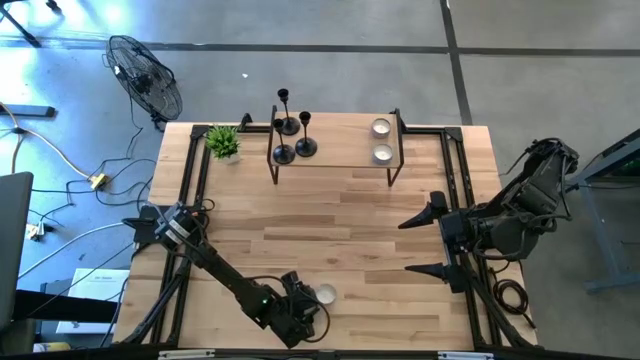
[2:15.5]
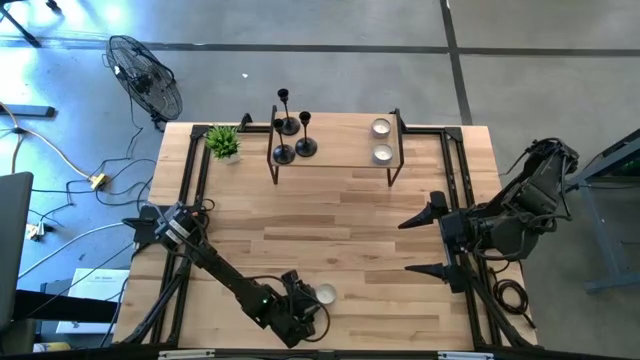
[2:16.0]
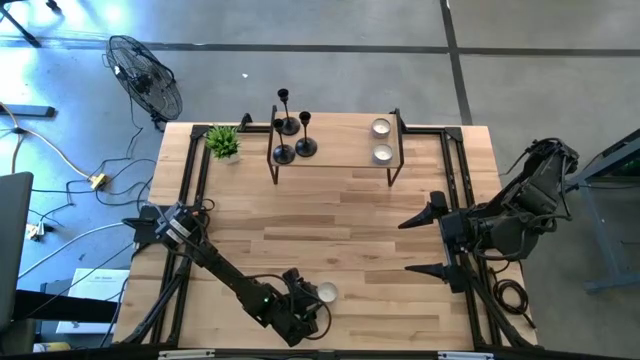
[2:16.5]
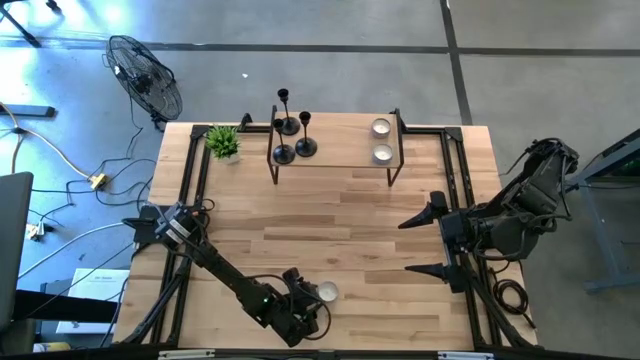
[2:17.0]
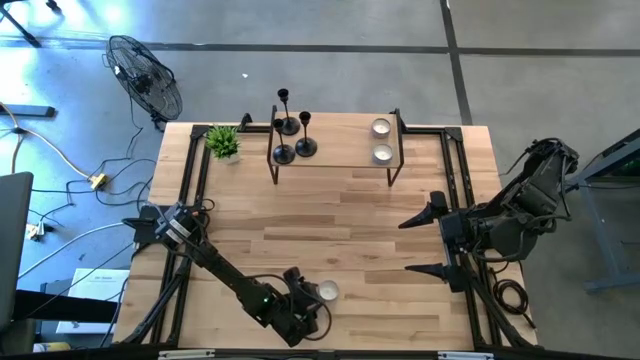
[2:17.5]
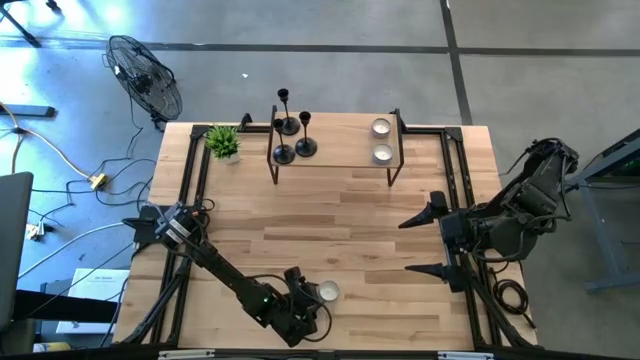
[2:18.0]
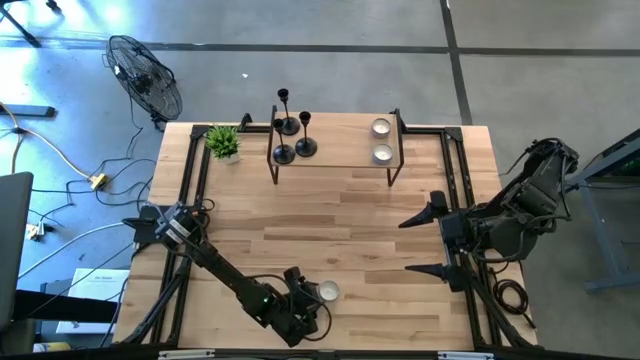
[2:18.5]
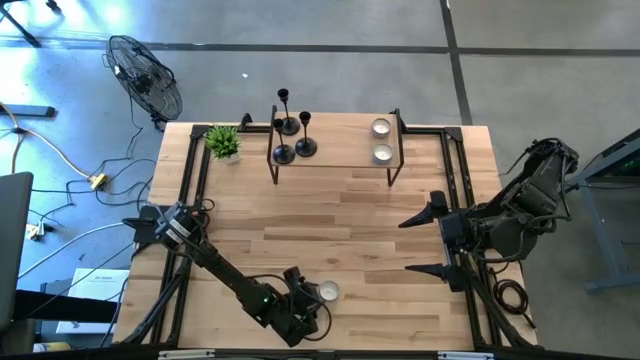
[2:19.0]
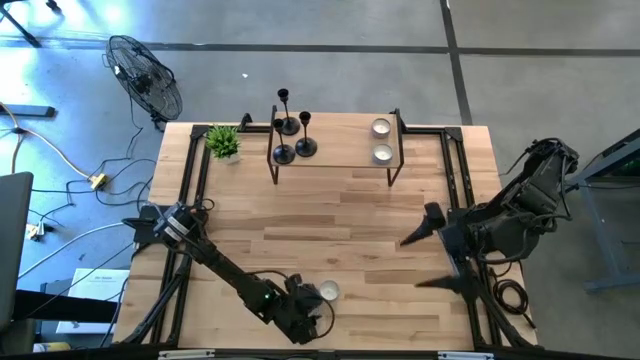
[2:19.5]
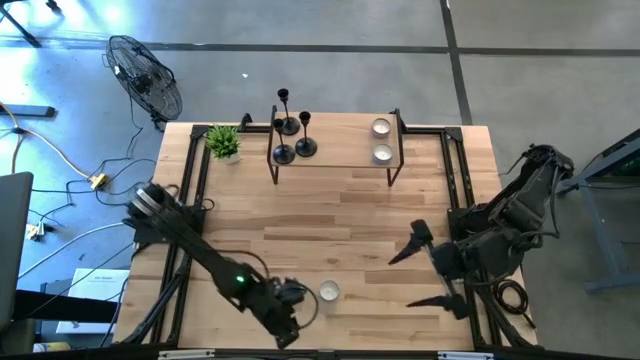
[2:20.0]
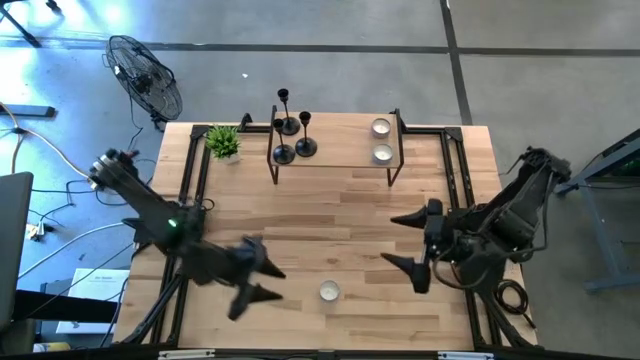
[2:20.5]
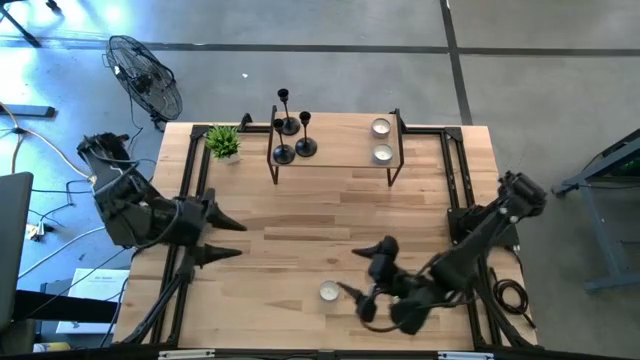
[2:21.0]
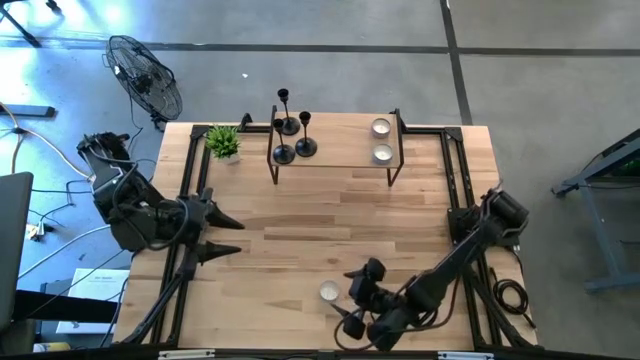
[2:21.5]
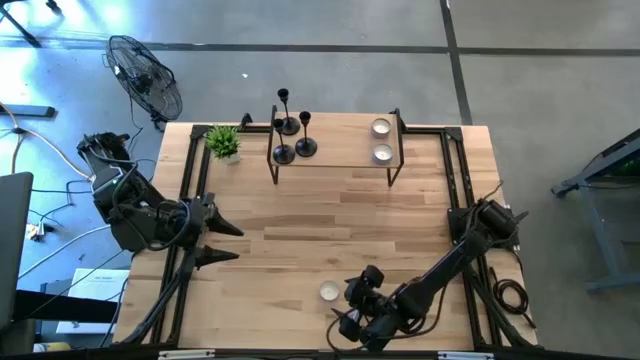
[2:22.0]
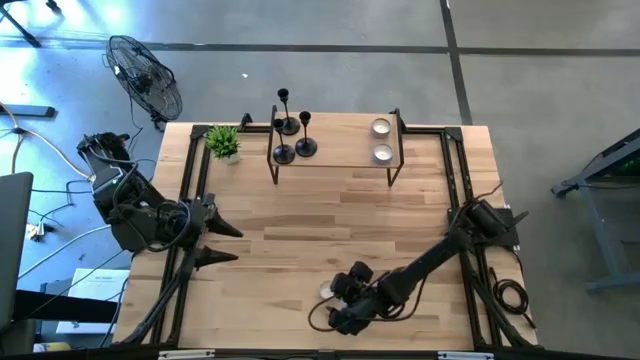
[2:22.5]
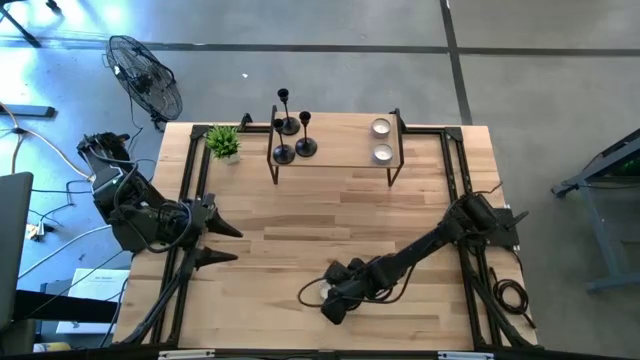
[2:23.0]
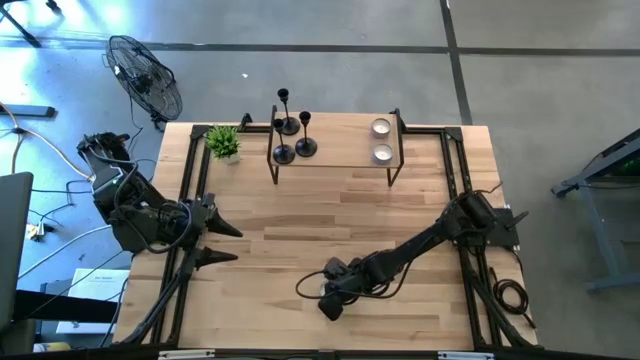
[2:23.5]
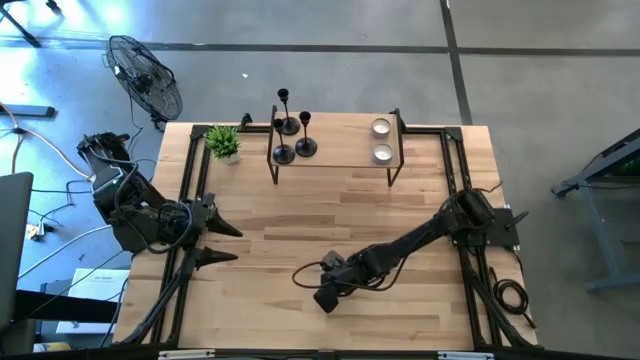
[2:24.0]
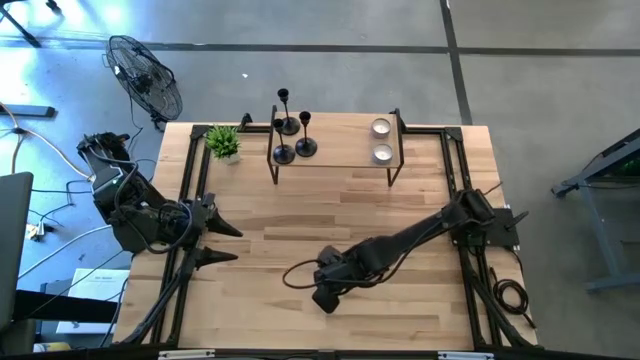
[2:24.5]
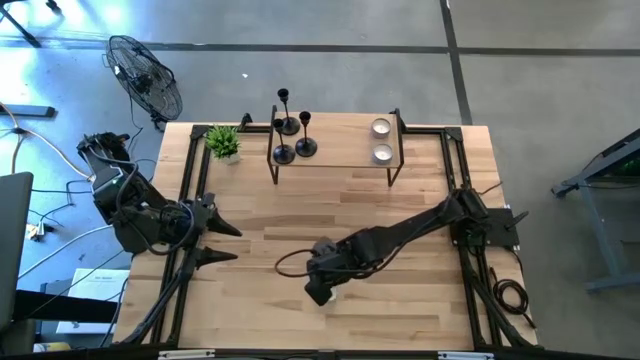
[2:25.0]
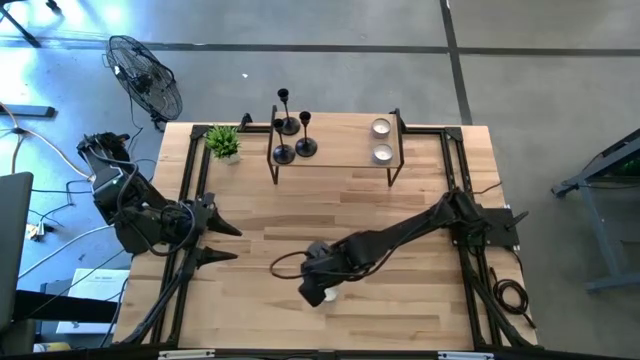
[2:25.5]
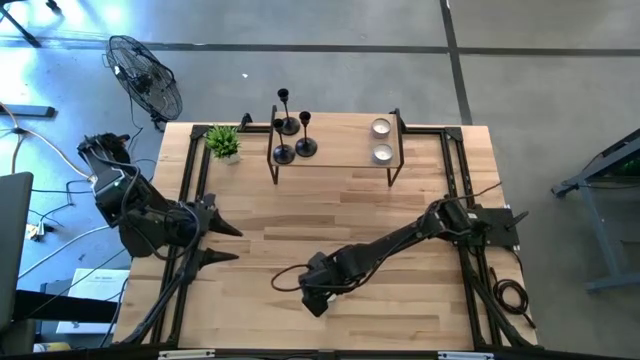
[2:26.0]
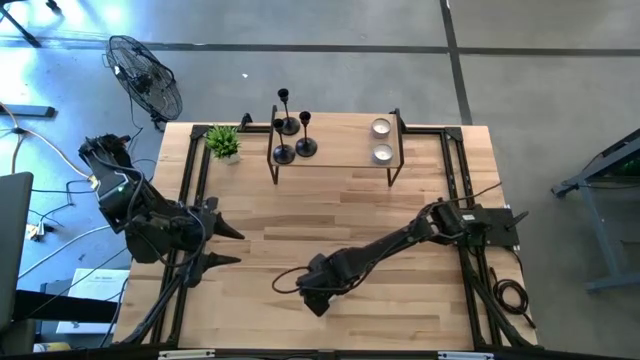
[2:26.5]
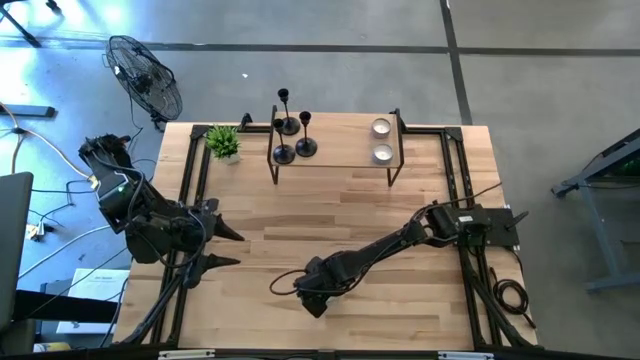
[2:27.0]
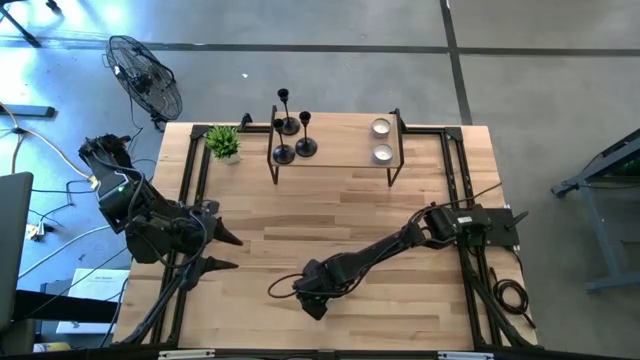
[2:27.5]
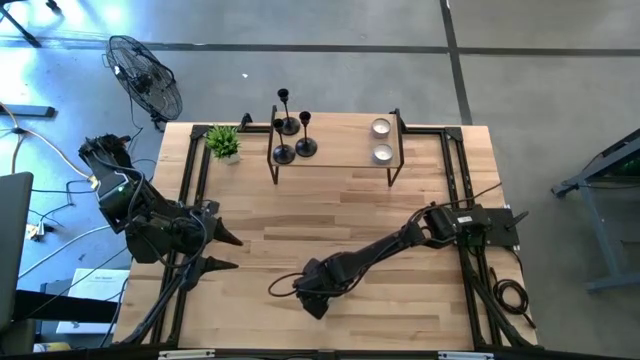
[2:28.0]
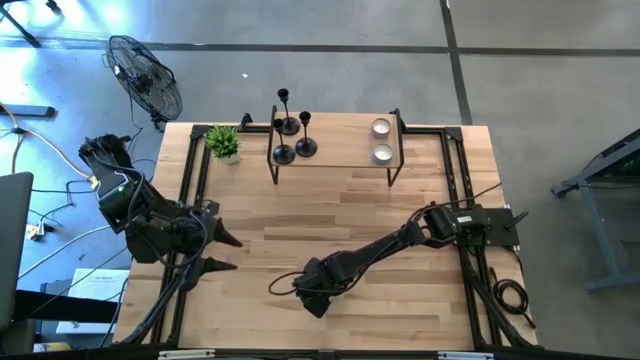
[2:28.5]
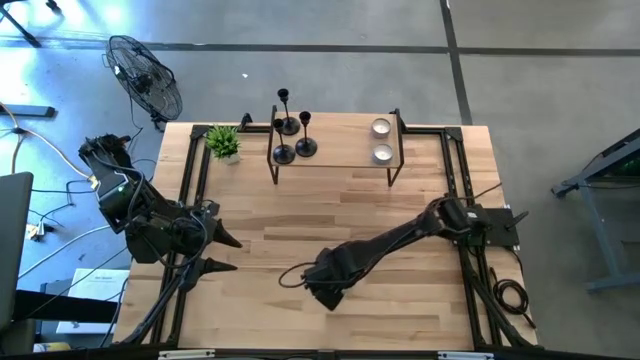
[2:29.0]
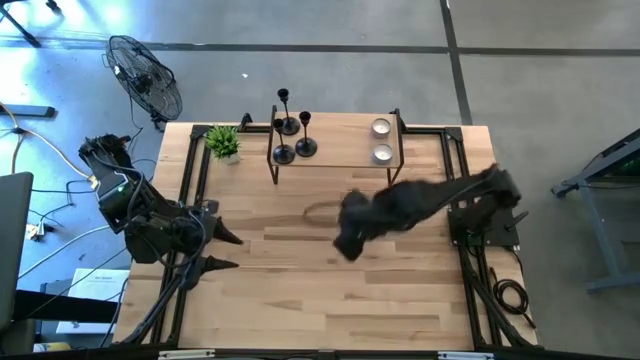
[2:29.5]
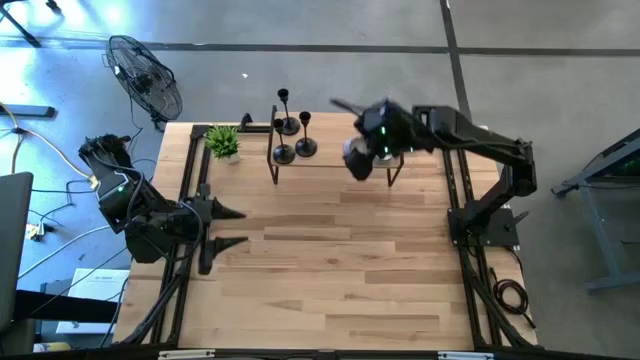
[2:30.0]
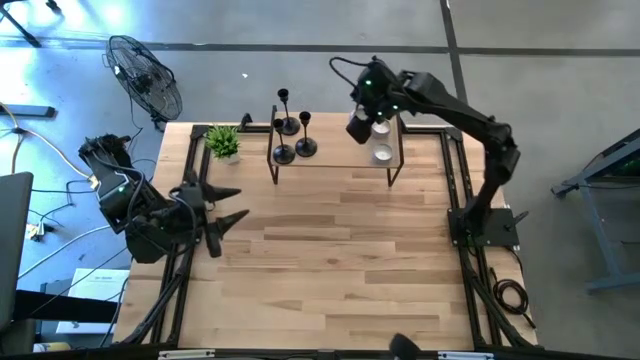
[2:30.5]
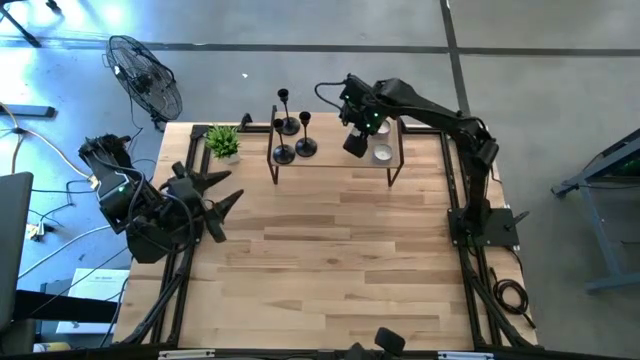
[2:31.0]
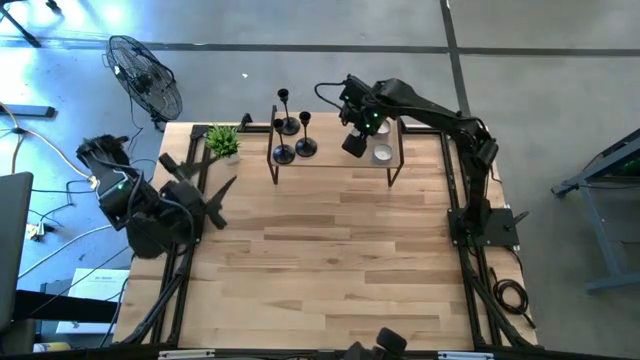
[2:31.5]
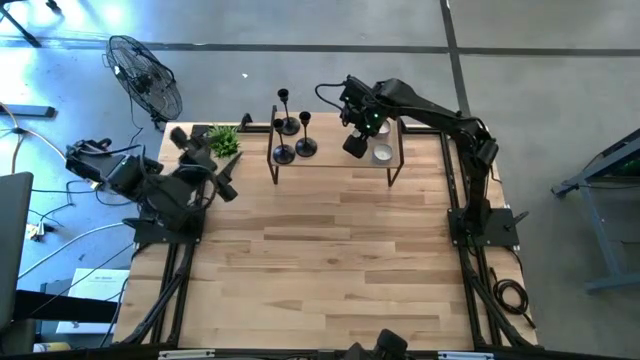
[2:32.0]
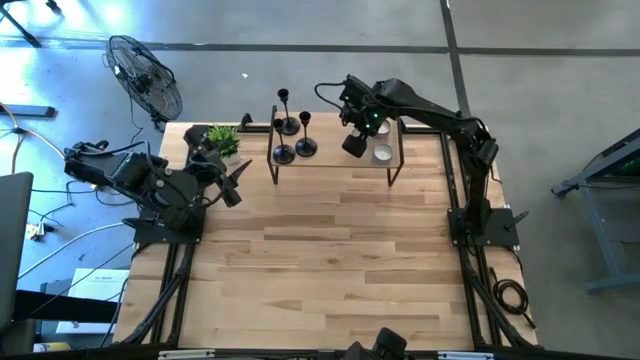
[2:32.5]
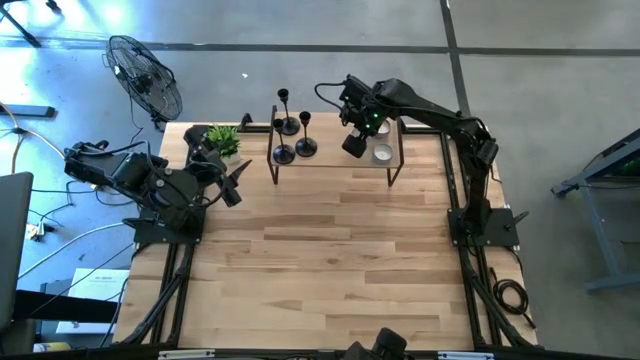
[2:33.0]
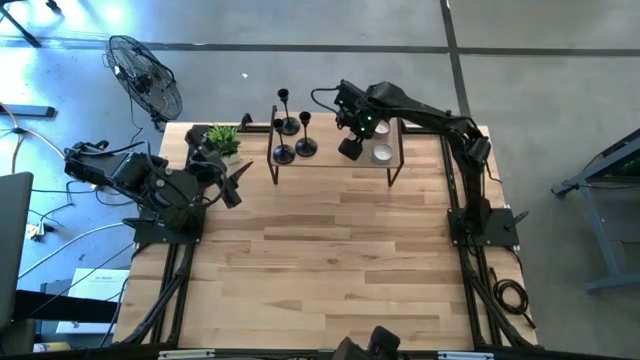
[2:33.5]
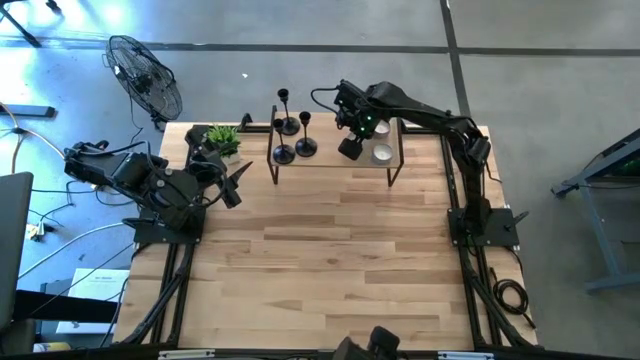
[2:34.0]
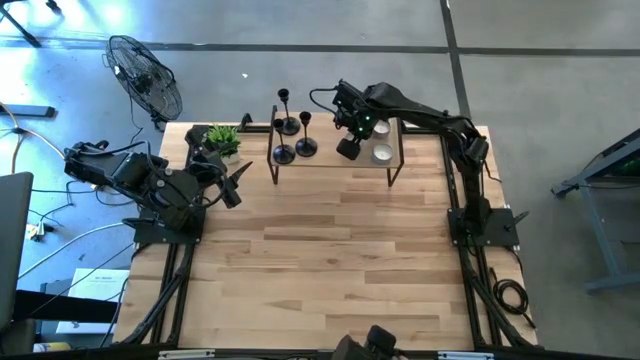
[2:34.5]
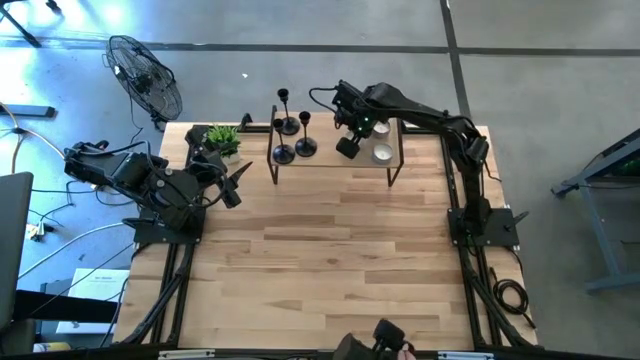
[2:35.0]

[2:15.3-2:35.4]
Task: Pick & Place candle stick holders
Put the red patterned scented candle on the shelf

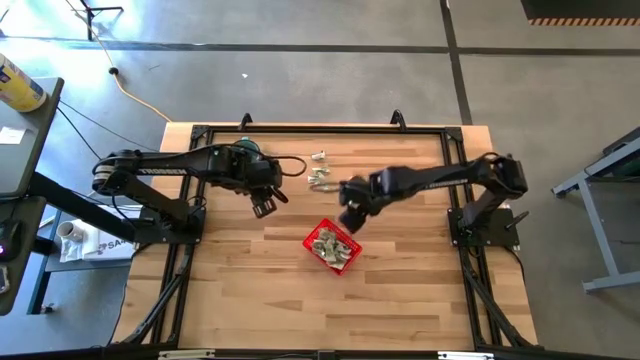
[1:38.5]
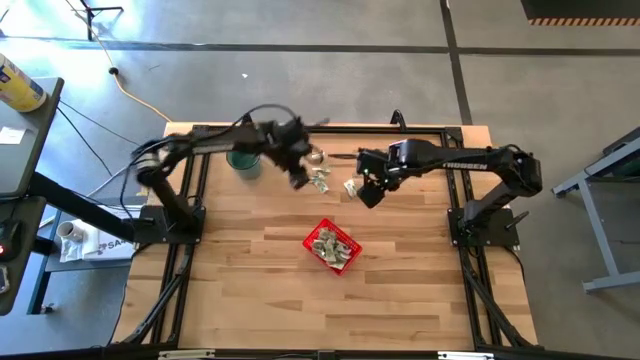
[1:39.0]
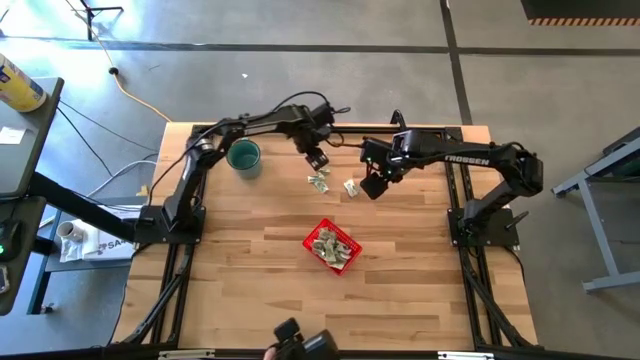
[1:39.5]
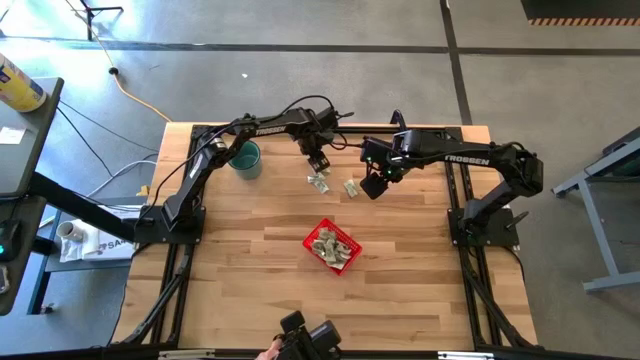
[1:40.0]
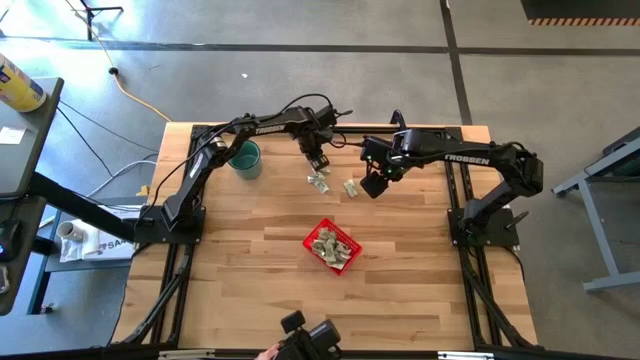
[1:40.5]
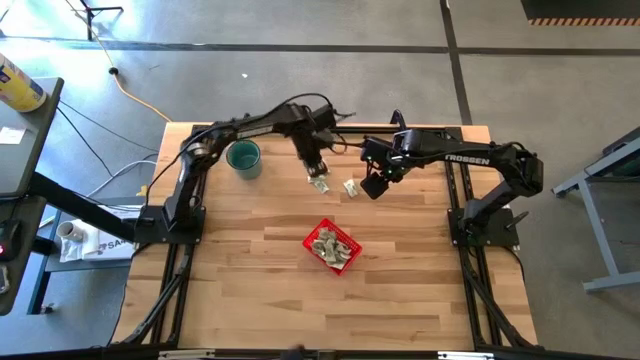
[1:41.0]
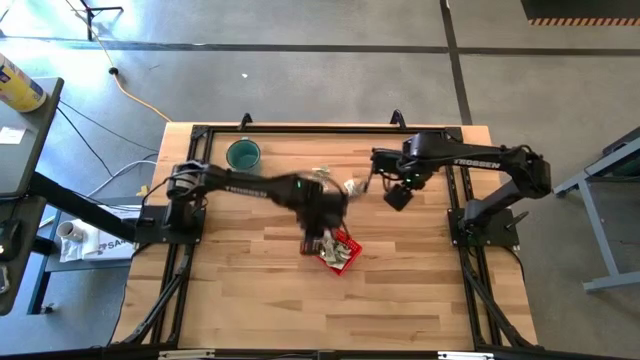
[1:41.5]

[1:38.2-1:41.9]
Task: Pick and place Stevia / Truvia into bins
Put the green stevia packet into the bin
